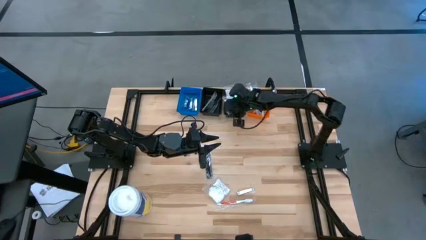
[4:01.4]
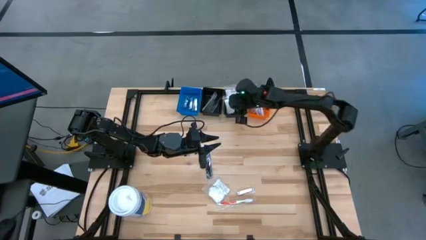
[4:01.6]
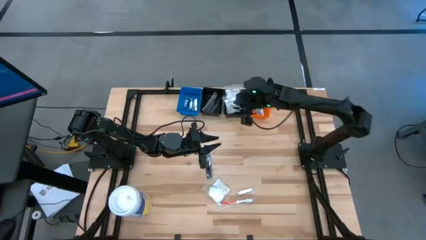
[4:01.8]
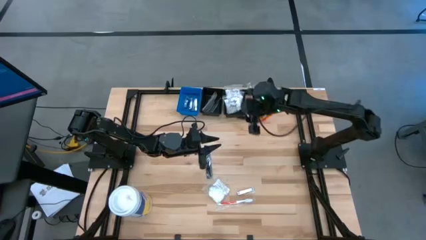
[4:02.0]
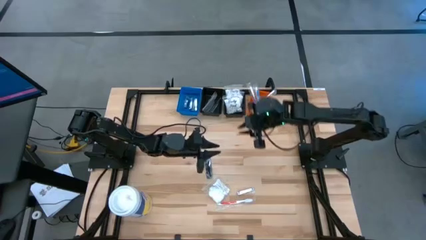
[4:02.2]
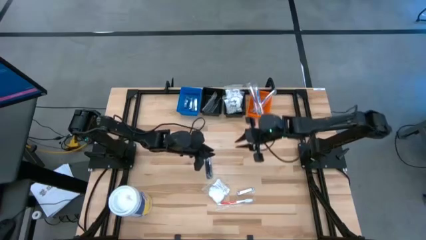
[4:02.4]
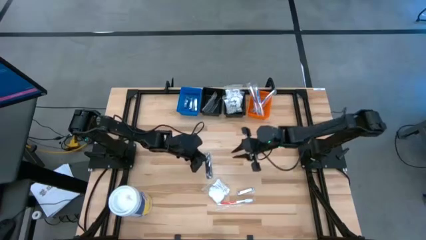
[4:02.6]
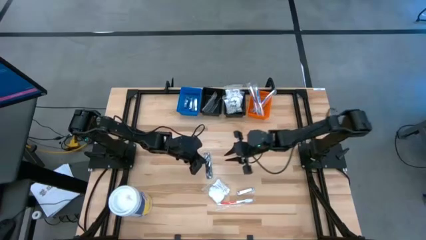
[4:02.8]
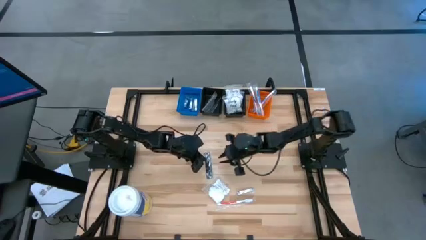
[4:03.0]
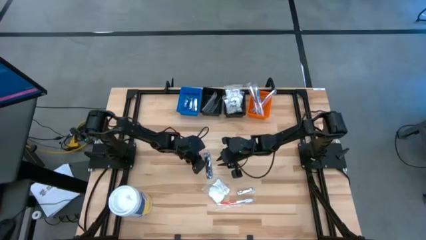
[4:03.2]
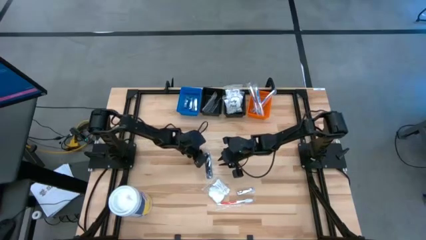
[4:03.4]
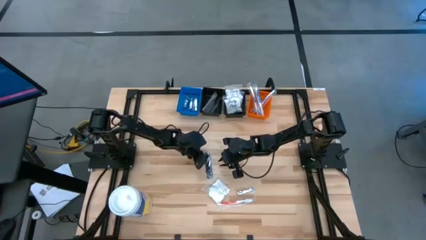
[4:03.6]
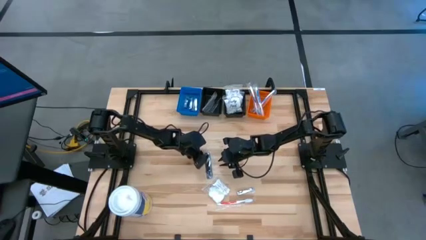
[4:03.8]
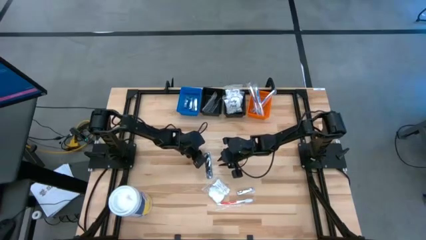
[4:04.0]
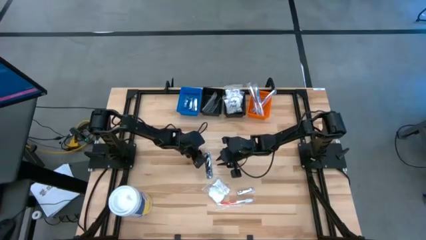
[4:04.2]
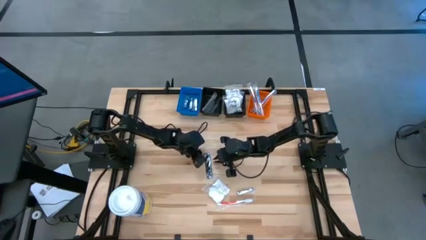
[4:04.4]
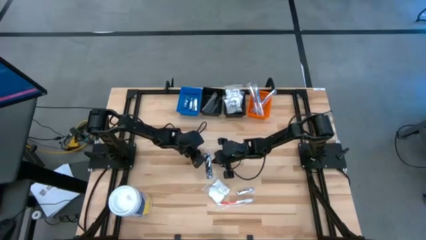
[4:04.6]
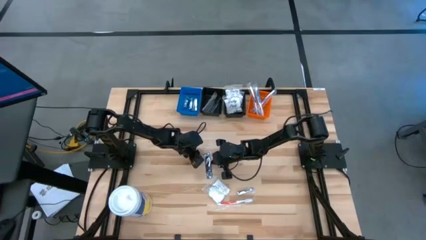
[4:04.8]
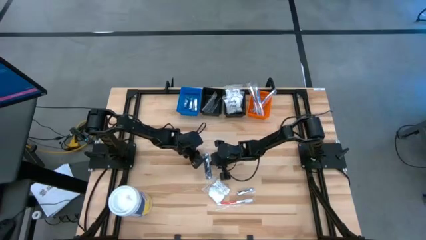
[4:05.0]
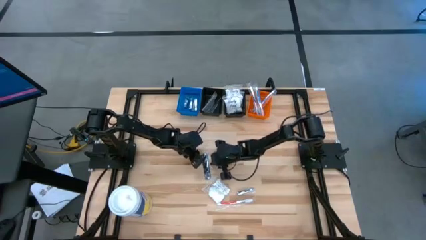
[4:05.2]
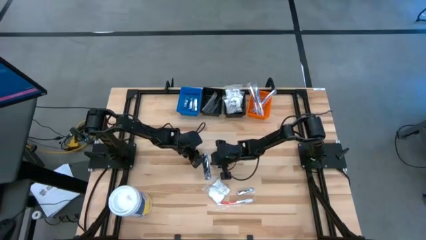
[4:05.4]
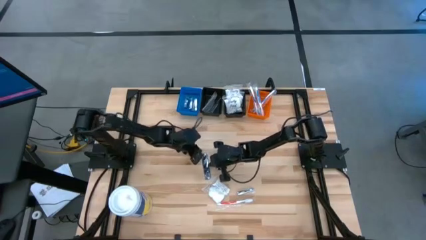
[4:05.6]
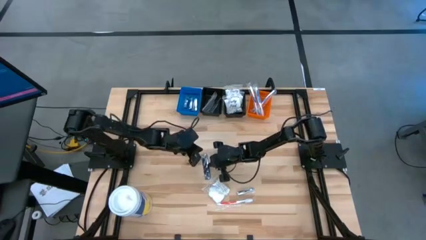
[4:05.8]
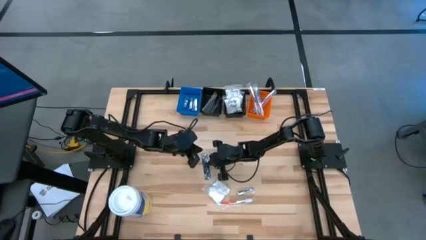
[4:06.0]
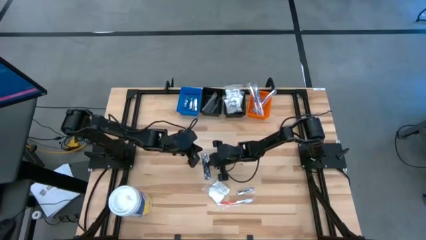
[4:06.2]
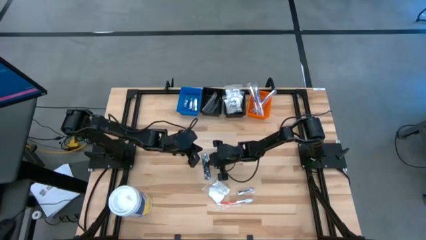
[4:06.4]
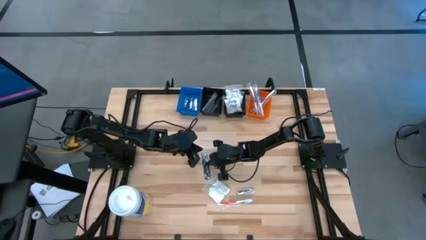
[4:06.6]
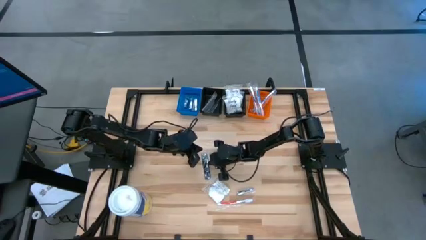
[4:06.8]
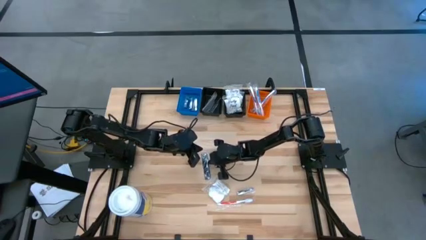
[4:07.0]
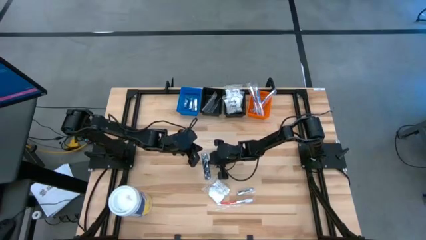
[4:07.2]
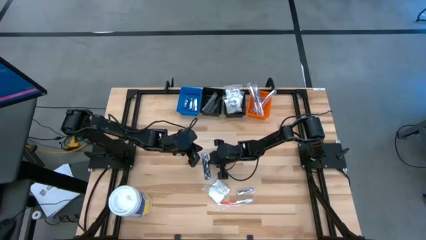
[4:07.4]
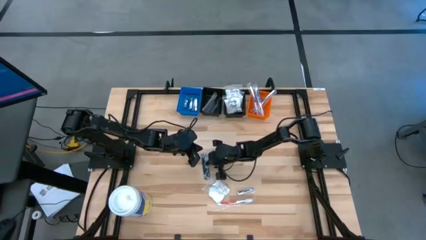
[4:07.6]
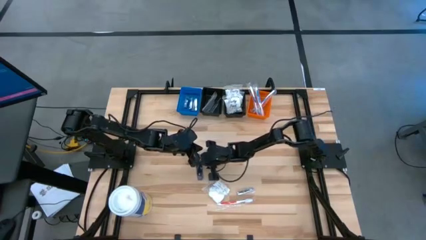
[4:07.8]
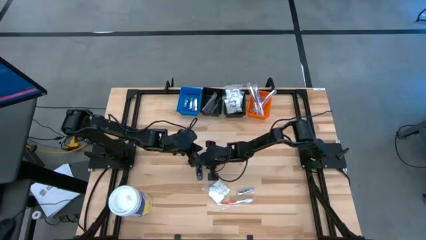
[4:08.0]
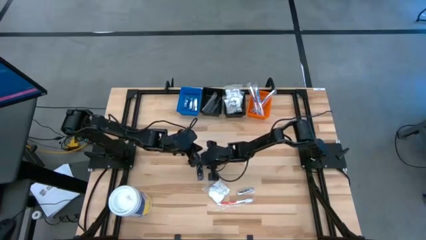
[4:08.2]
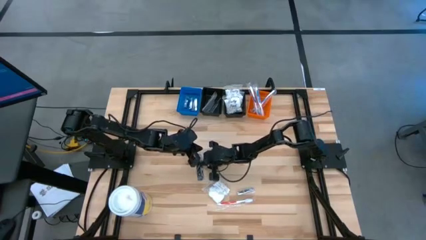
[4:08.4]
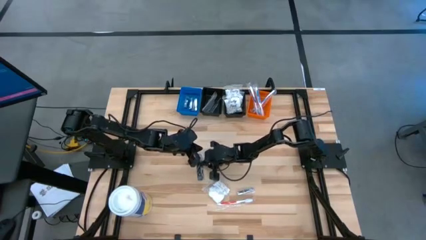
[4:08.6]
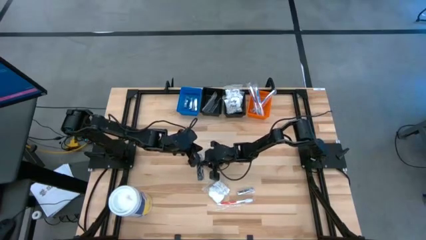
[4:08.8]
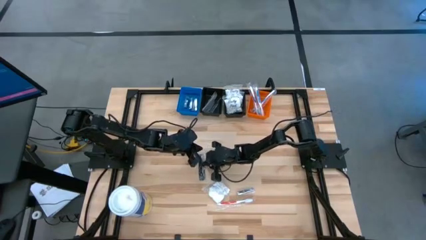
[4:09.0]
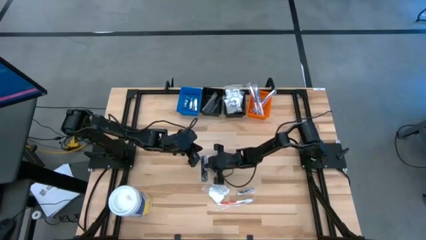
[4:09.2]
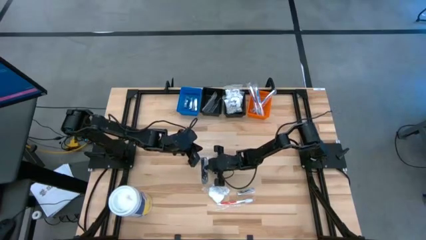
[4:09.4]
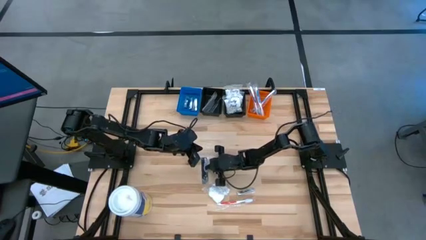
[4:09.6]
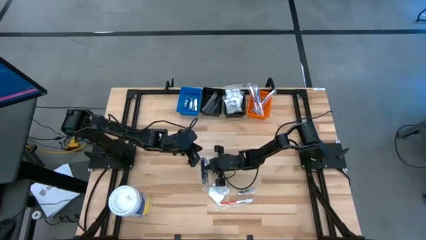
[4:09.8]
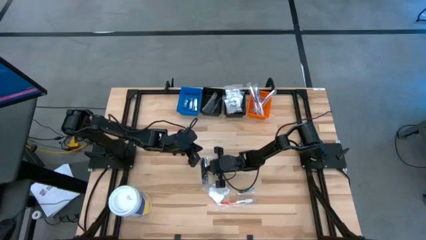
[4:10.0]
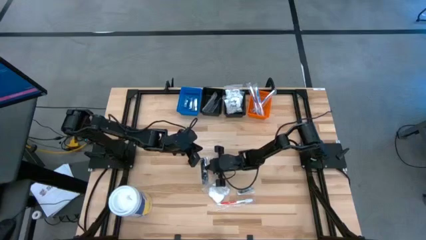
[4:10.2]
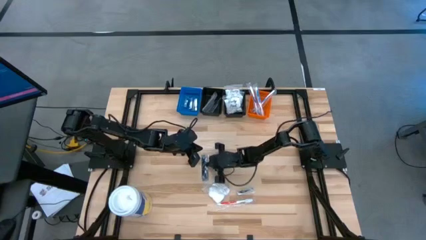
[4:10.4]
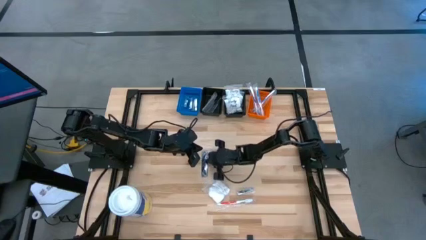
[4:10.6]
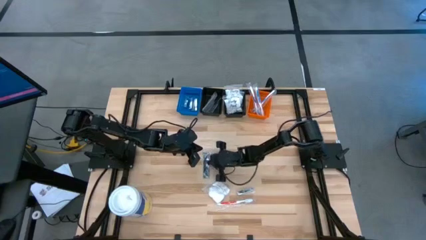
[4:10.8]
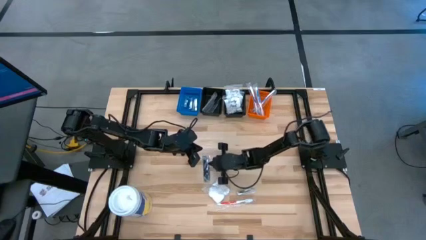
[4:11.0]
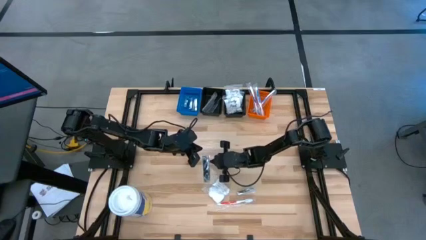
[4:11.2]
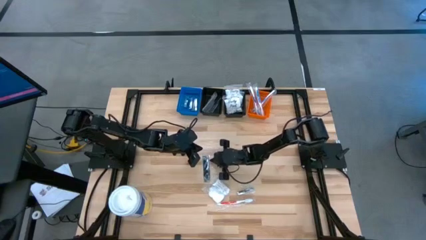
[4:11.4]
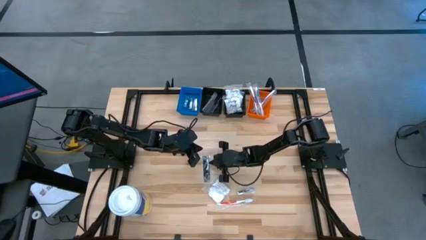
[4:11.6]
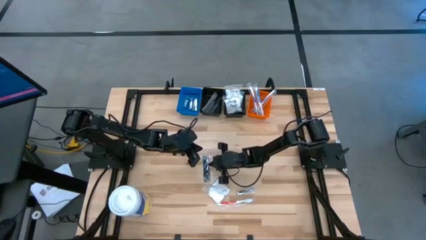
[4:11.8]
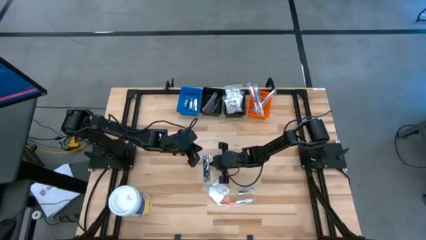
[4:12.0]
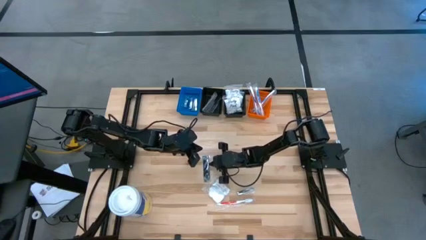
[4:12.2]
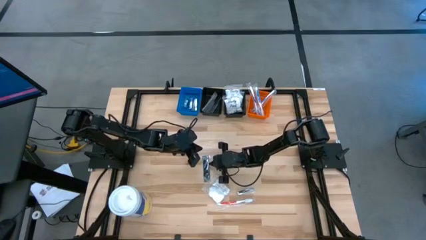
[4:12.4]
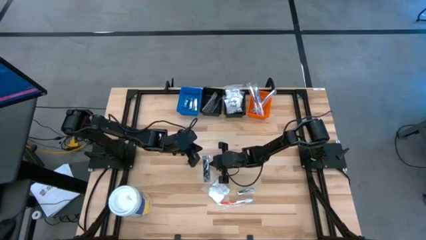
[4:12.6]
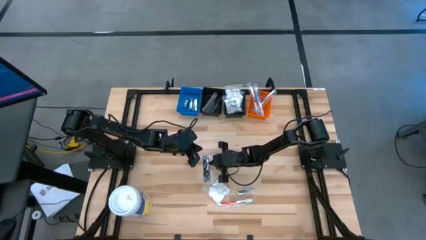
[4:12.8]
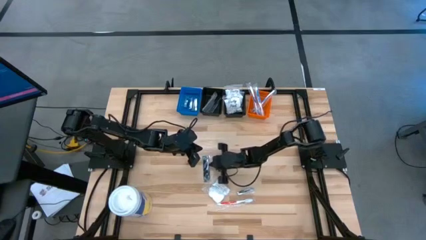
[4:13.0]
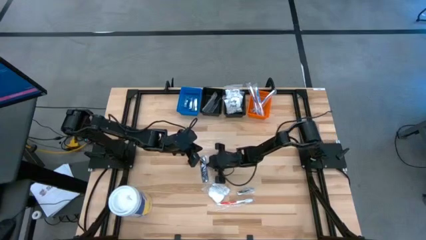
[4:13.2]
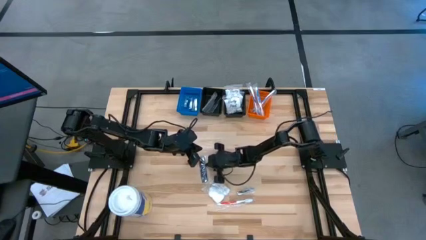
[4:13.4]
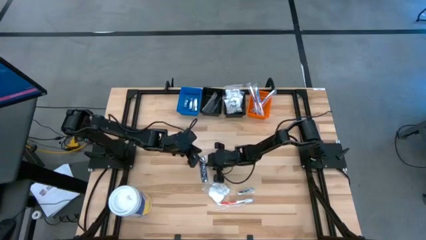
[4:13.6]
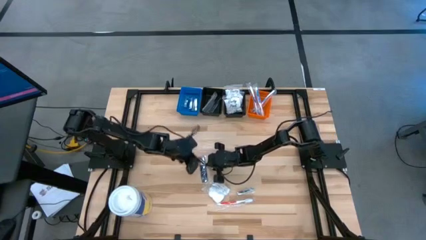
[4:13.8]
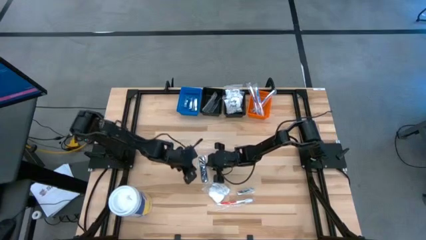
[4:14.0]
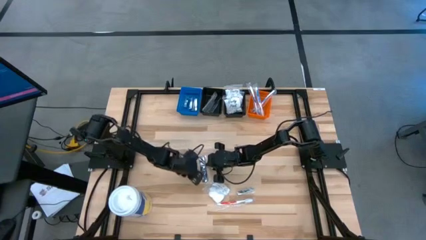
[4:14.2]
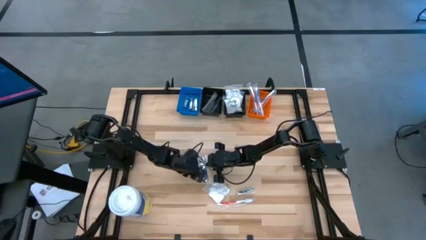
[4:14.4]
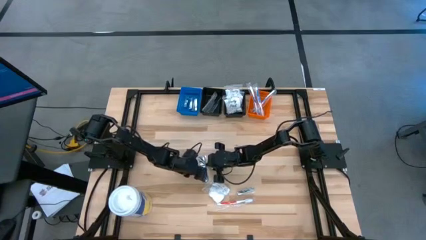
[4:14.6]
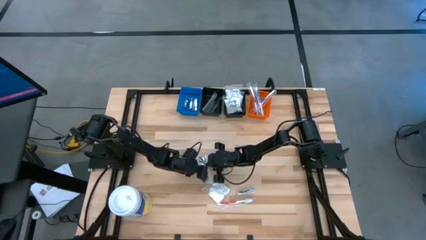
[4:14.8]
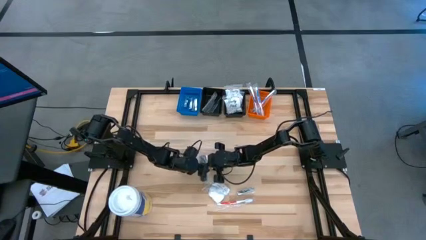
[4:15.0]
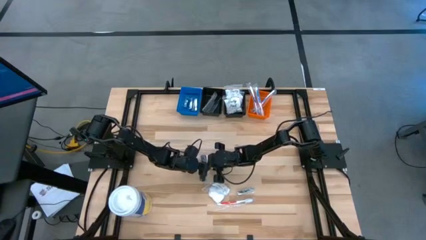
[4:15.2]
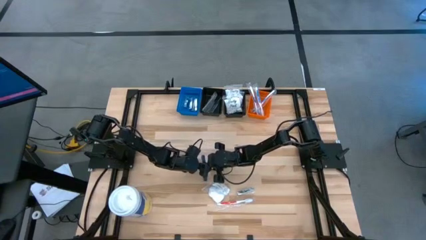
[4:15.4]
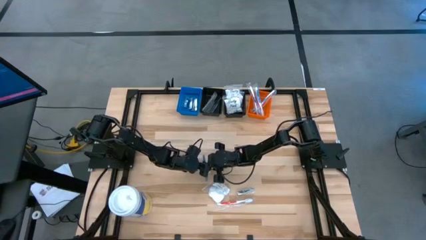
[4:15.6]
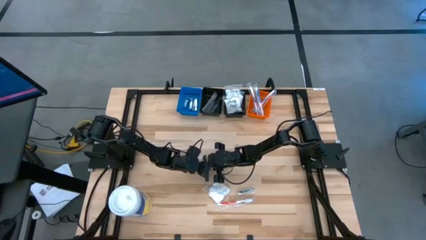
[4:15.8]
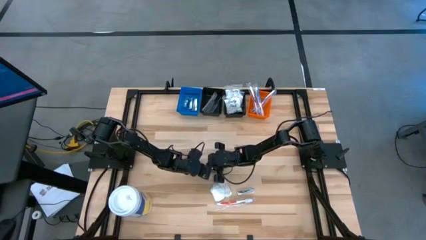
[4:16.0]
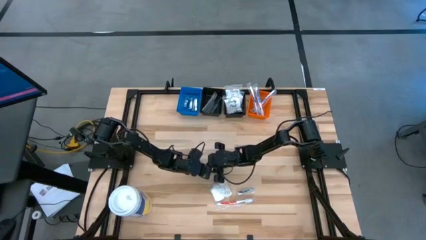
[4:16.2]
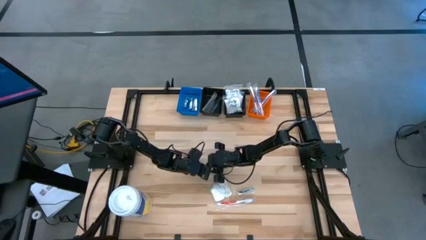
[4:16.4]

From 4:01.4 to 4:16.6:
Task: Pick & Place Travel size toiletries
Put the black comb into the left black bin

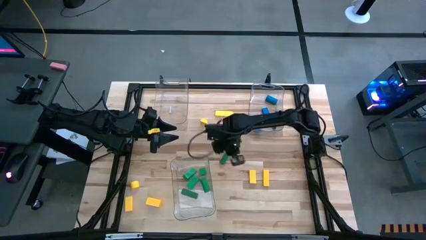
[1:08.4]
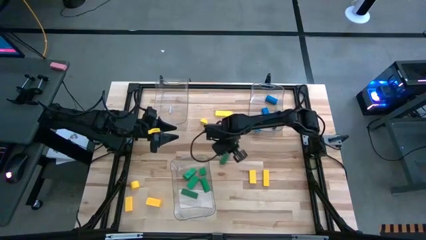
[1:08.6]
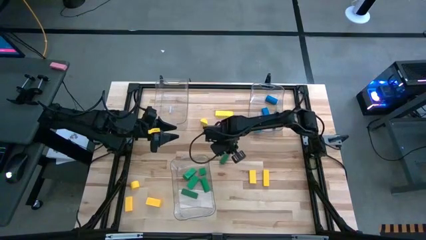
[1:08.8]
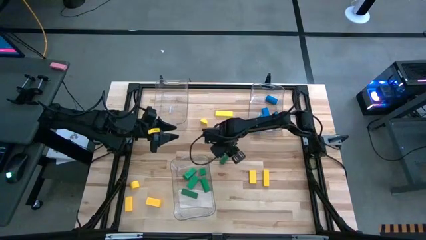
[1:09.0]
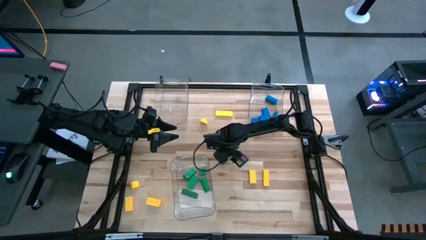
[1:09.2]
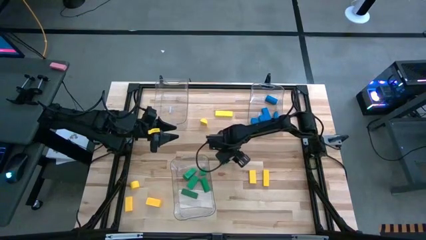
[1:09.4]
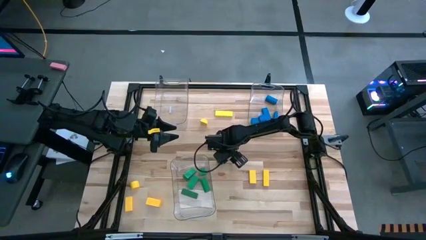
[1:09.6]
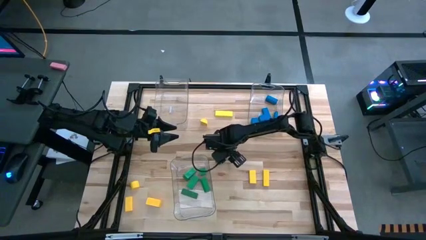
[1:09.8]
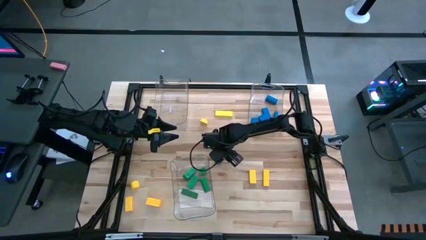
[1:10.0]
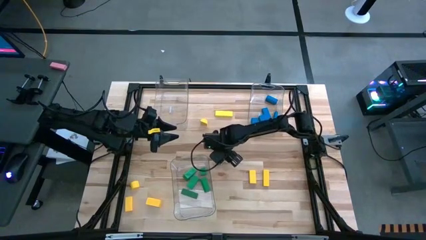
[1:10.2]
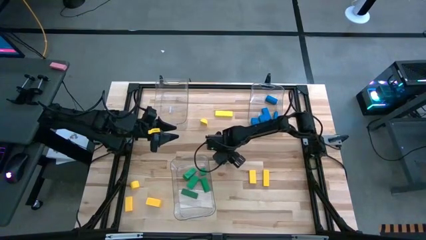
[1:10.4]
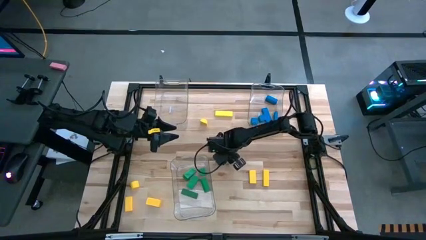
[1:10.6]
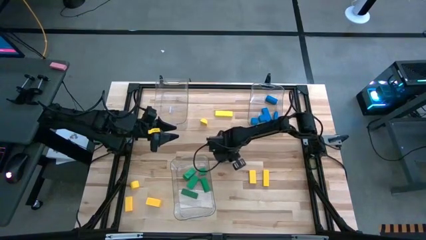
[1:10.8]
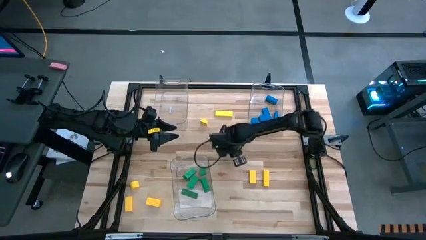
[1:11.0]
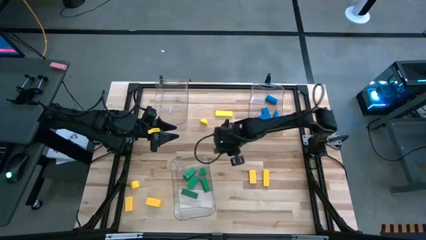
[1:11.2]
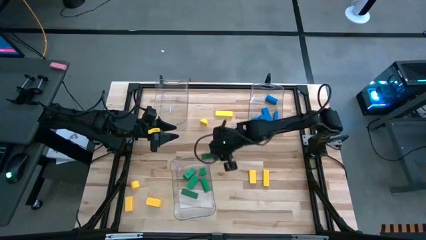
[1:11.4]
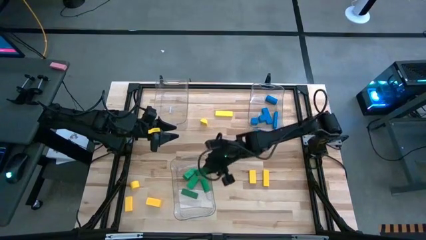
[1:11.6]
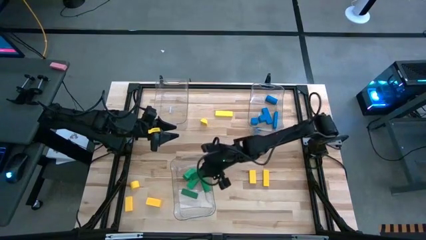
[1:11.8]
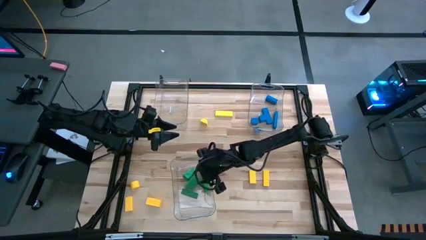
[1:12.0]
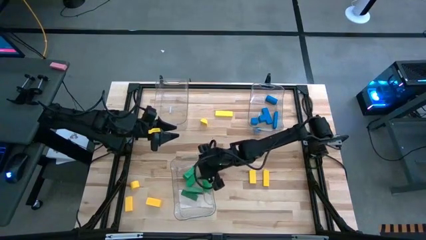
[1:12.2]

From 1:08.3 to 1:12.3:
Task: Sort blocks
Put the green block into the bottom transparent bin
